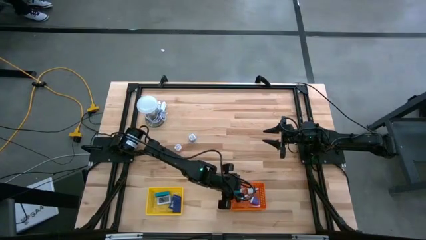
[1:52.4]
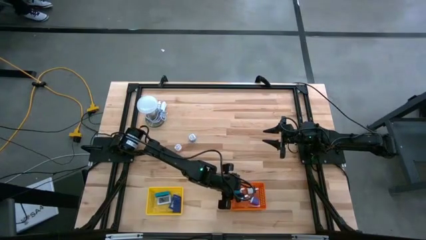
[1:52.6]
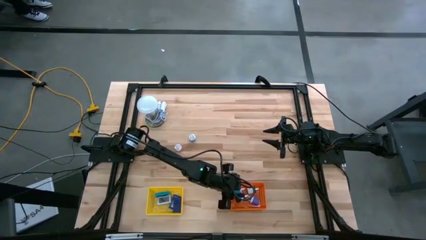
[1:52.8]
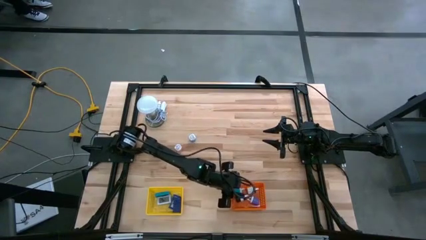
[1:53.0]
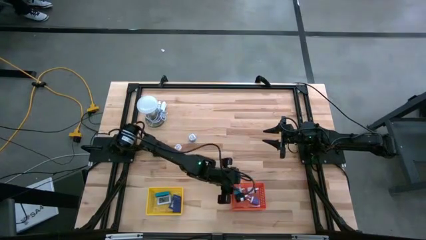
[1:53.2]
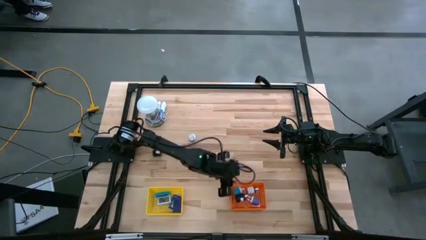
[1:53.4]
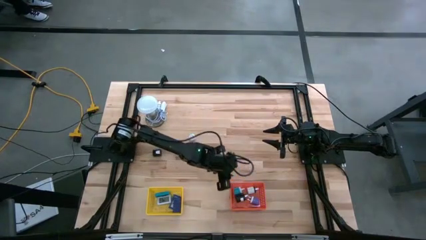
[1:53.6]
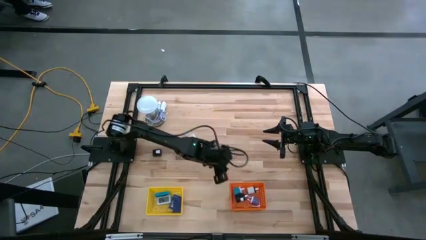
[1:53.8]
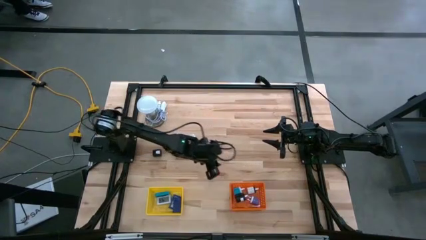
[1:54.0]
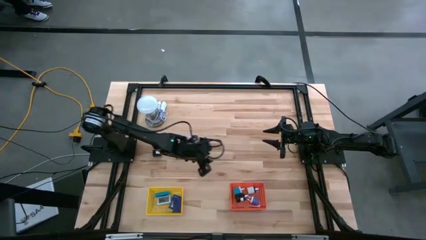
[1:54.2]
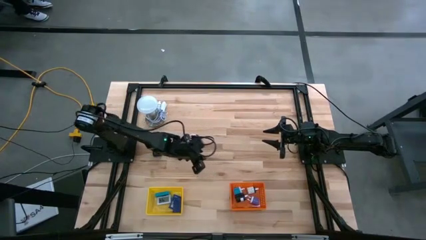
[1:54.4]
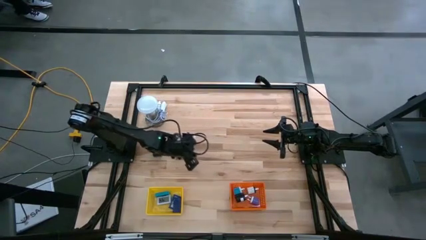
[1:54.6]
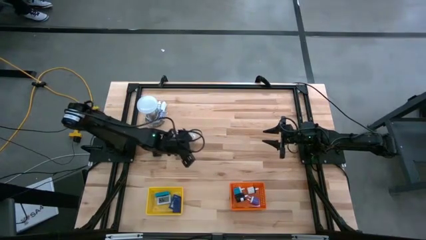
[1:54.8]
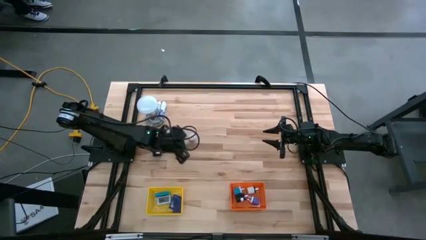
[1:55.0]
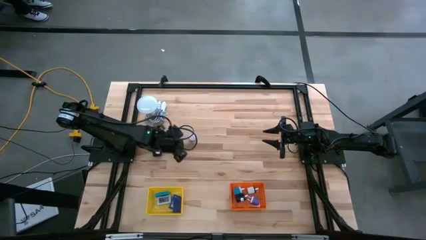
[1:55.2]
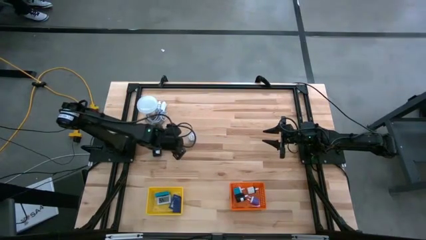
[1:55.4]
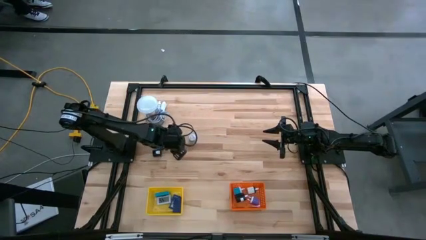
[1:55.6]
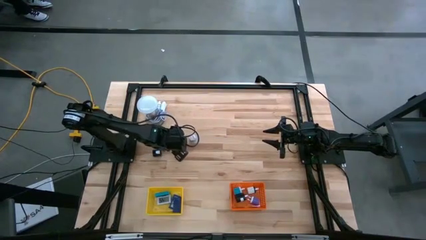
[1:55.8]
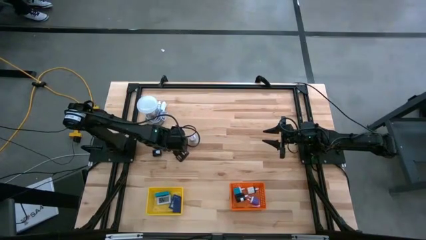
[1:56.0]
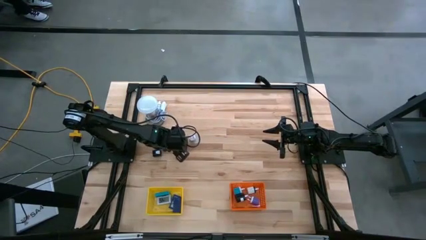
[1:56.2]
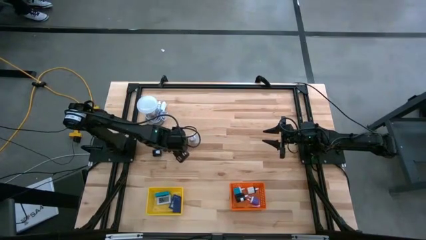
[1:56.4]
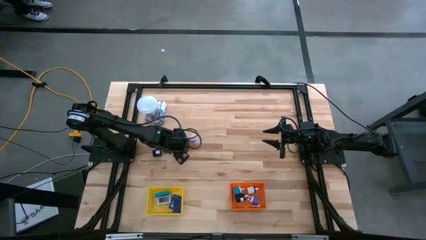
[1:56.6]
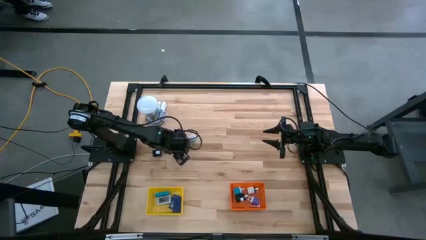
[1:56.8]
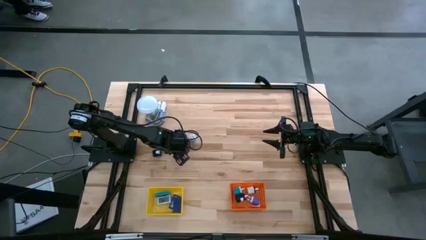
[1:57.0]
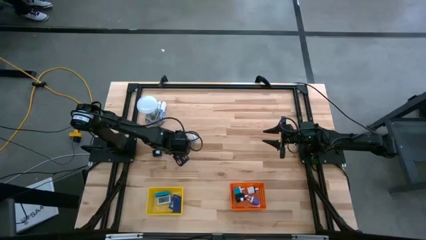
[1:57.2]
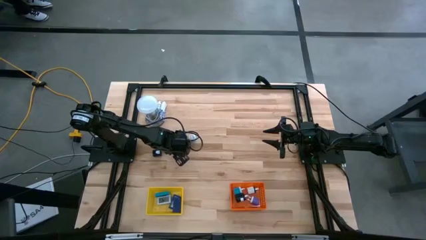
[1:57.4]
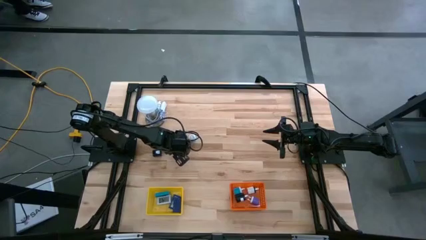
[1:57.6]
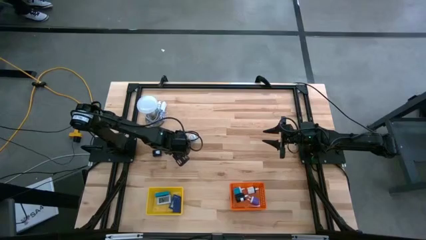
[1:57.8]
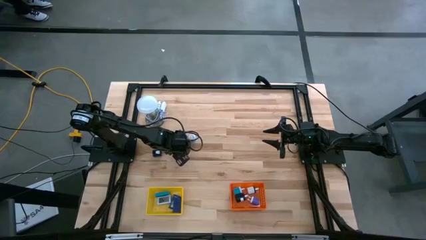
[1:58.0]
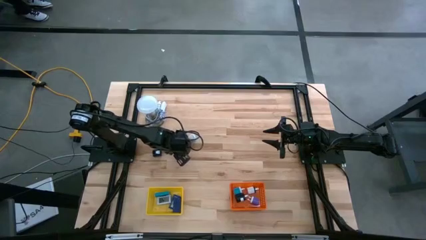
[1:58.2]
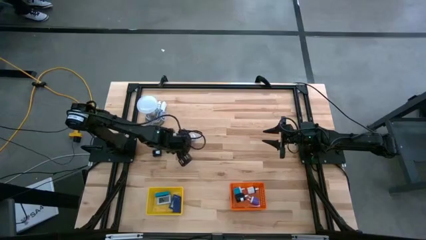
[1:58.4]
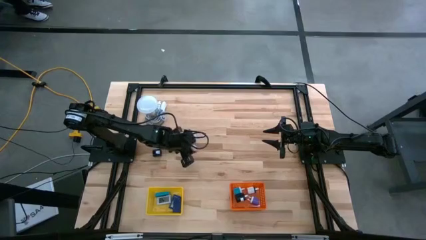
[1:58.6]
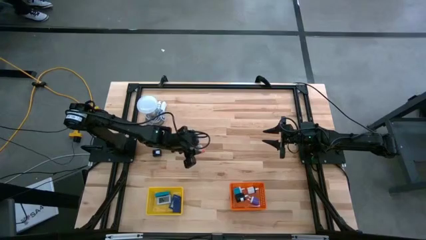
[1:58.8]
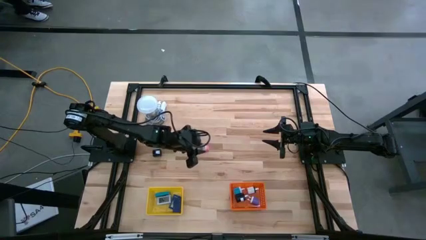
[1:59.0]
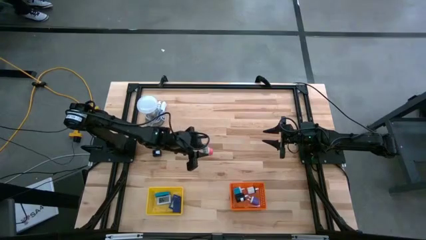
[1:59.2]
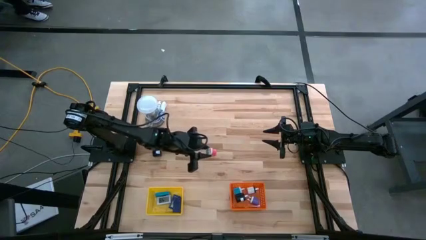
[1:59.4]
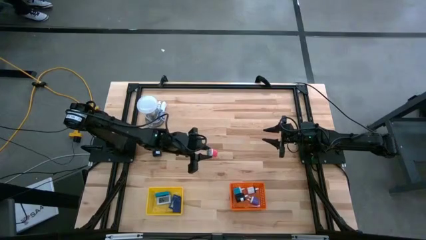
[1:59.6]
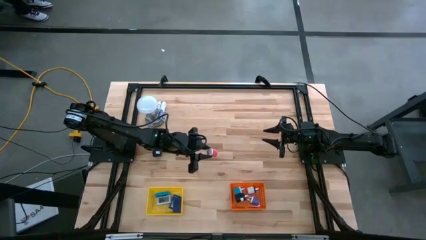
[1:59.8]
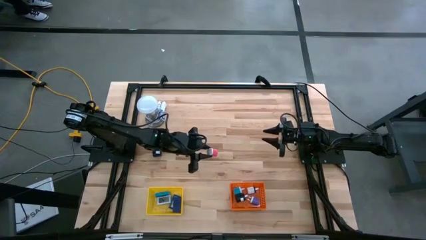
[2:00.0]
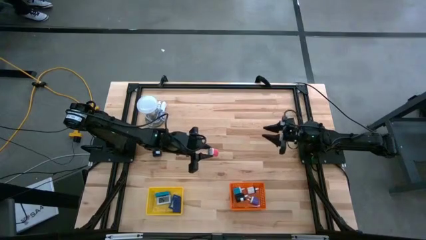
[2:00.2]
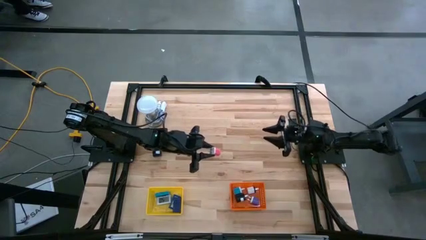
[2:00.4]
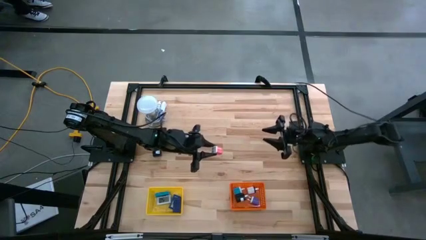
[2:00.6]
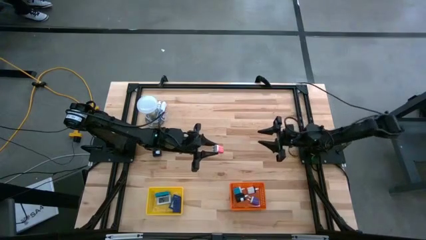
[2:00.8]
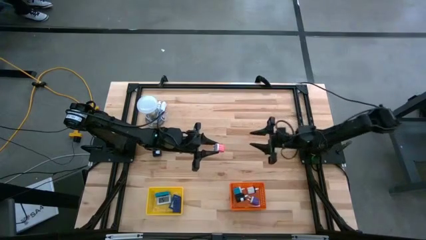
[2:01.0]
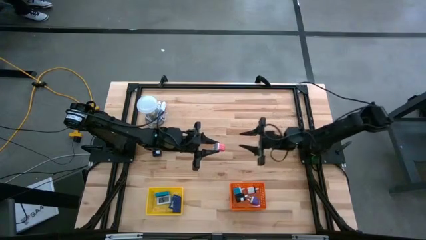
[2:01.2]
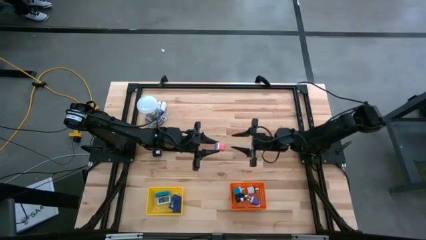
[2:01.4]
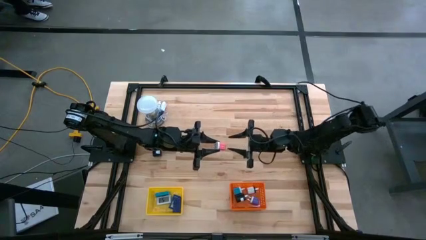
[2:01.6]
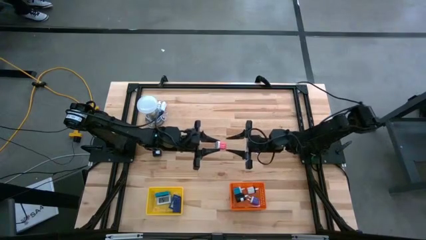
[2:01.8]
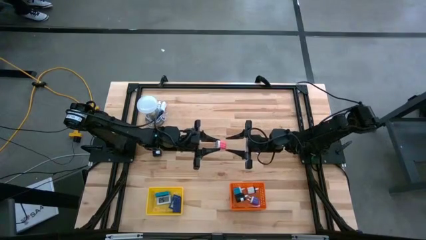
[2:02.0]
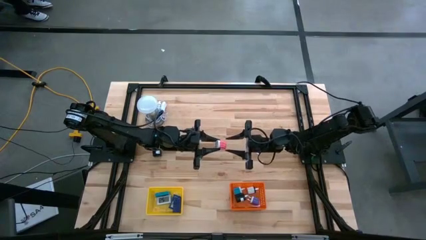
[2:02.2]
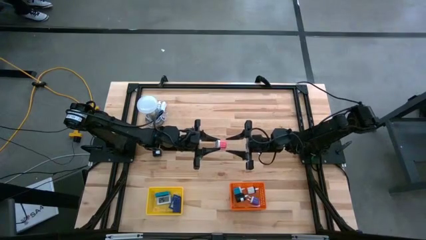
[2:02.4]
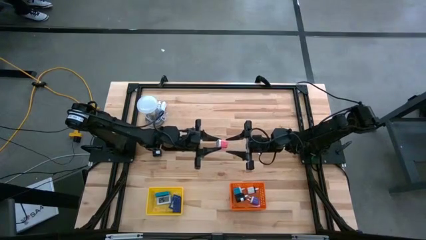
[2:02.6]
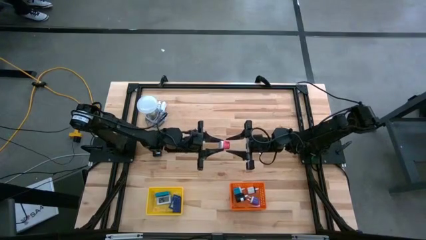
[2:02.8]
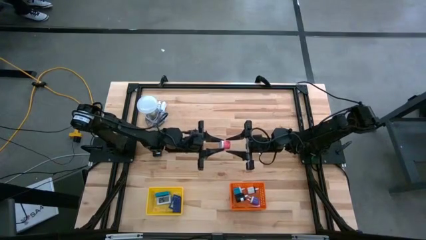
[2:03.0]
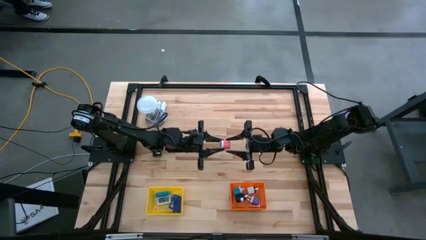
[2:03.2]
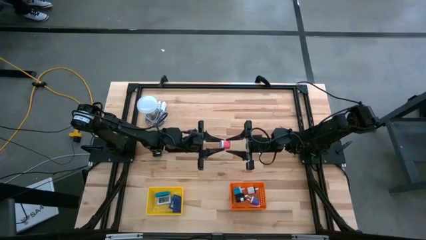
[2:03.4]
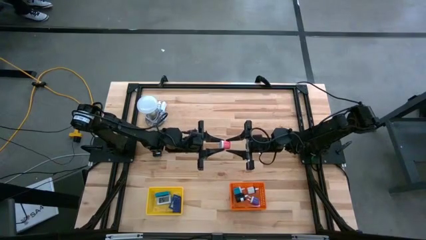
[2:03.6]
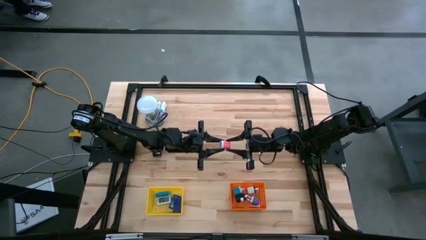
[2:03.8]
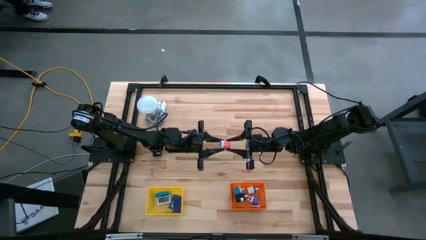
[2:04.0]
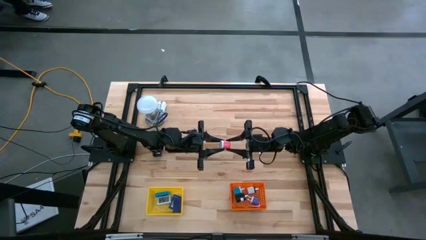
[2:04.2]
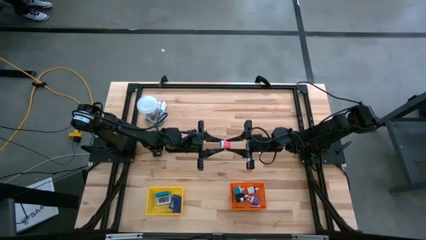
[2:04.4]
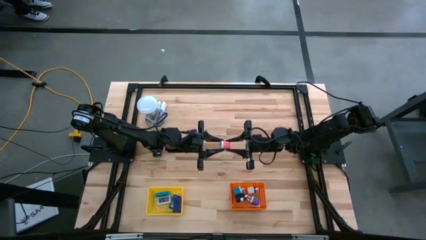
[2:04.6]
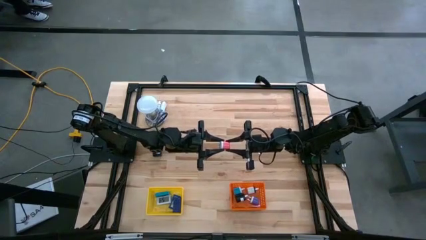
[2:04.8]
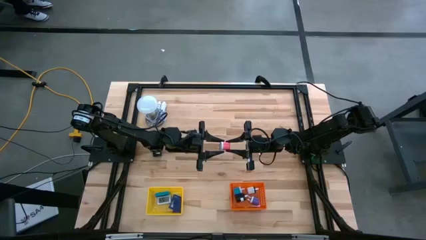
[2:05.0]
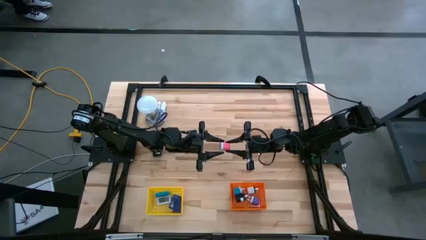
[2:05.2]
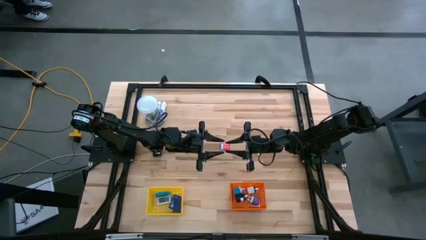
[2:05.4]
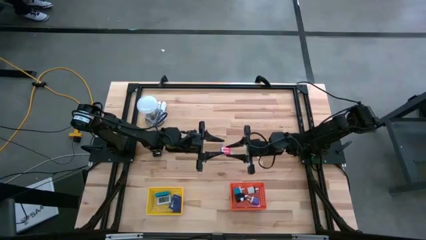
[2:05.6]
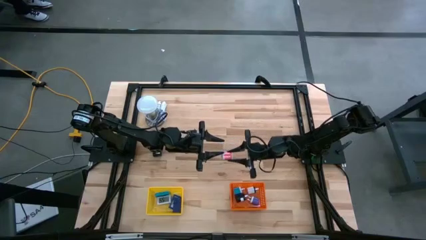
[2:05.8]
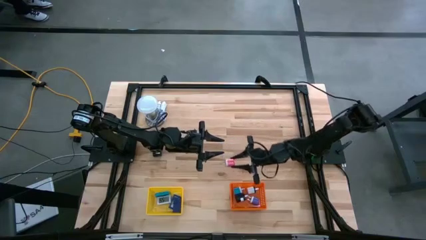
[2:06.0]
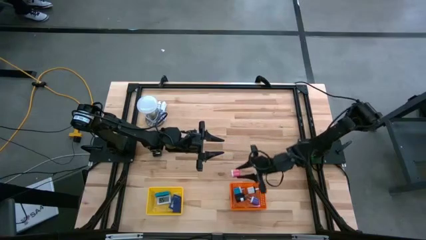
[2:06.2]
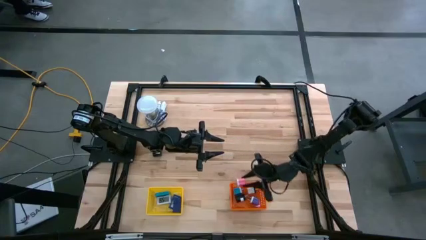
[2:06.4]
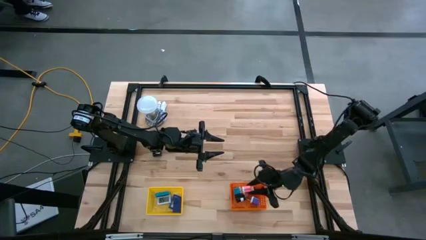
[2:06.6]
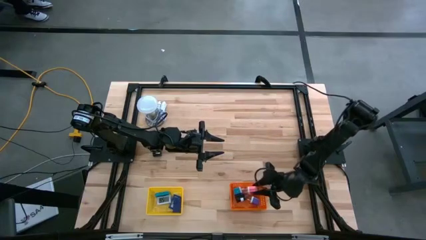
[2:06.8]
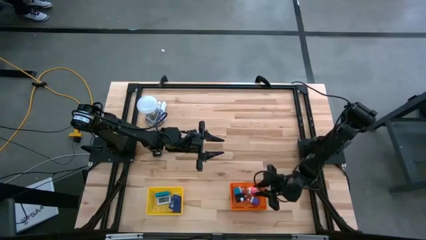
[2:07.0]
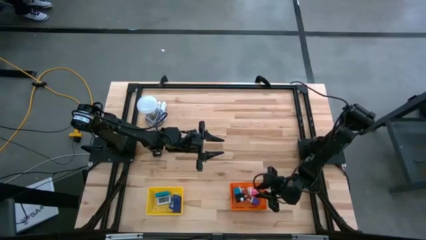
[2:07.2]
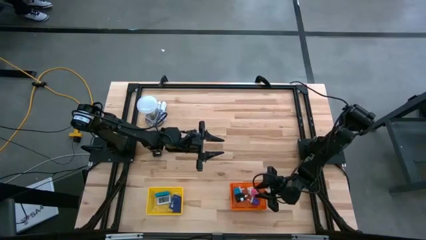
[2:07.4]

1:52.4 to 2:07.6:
Task: Pick & Place Office items
Put the pink charger adapter into the orange bin
